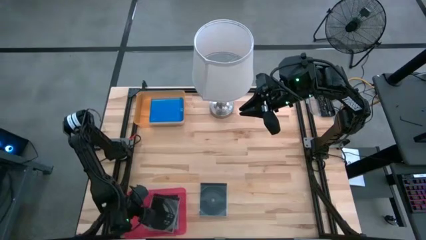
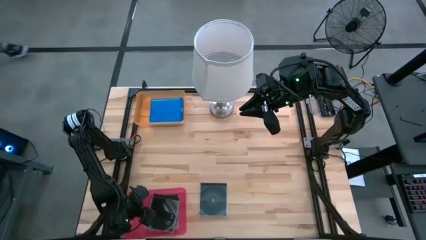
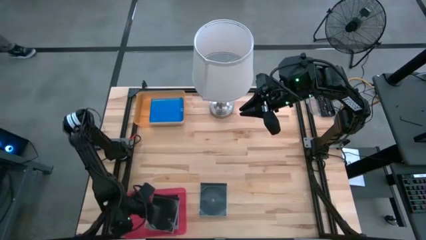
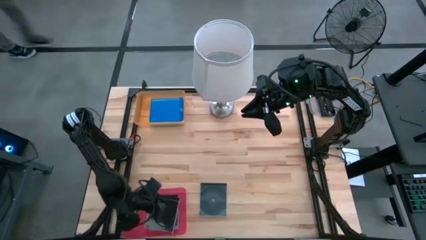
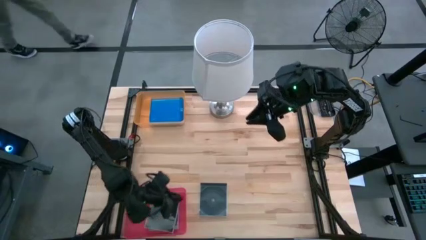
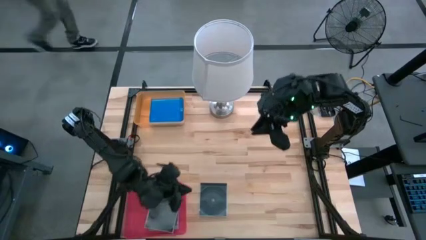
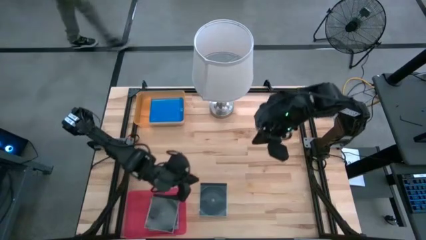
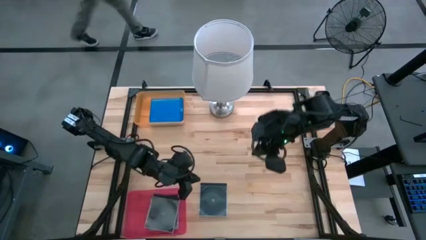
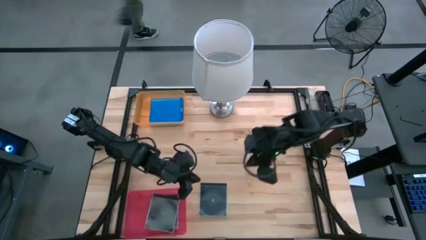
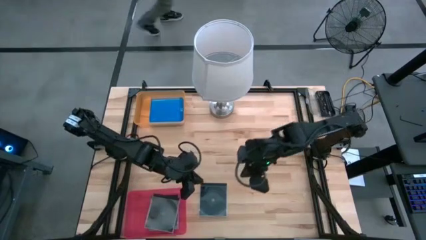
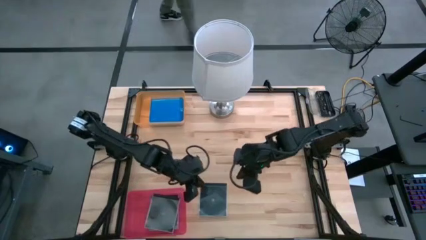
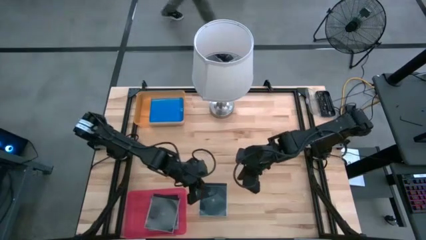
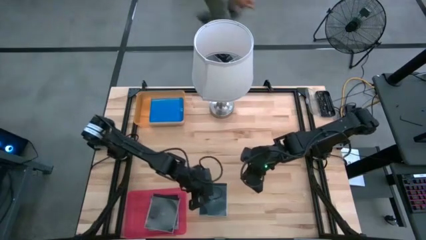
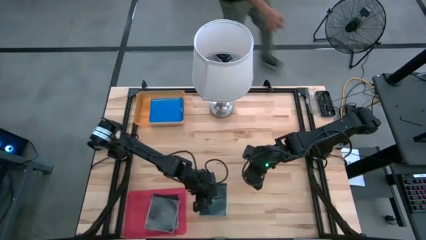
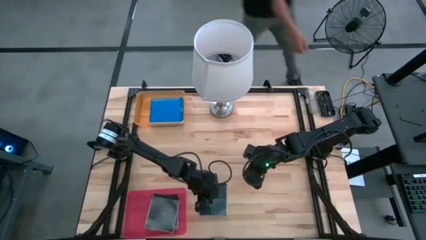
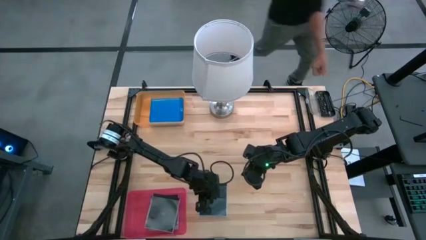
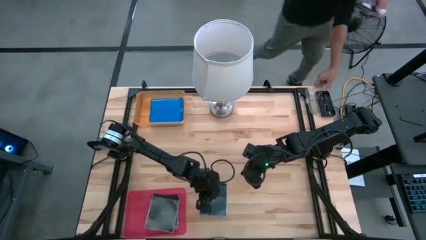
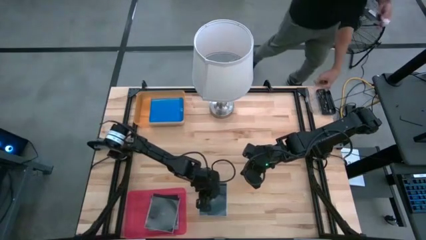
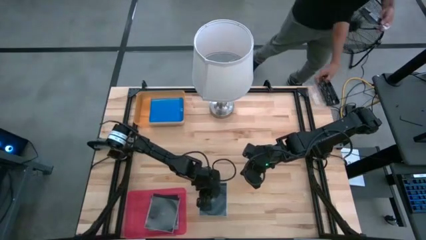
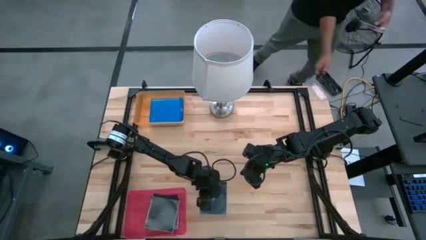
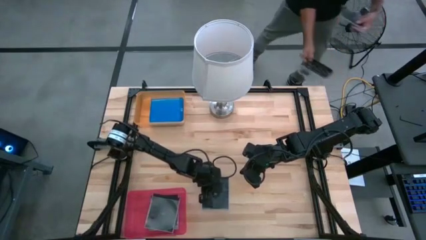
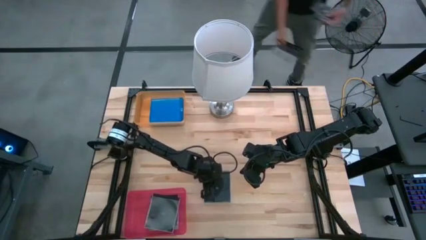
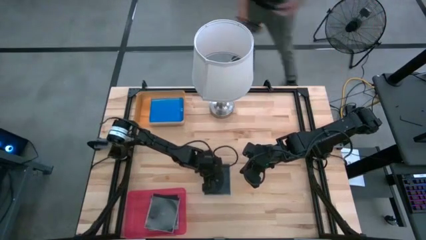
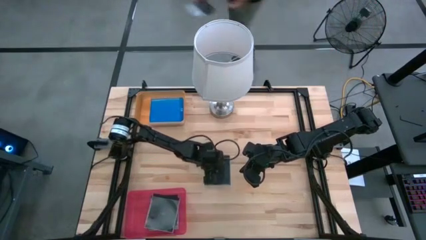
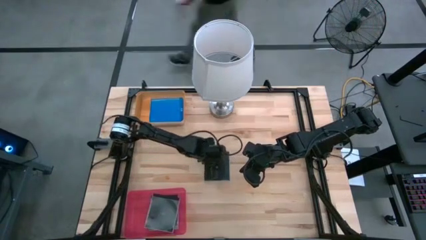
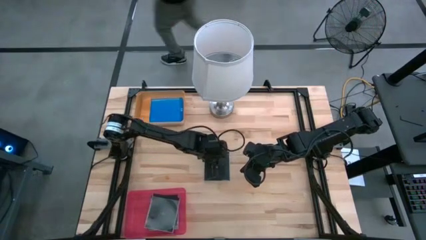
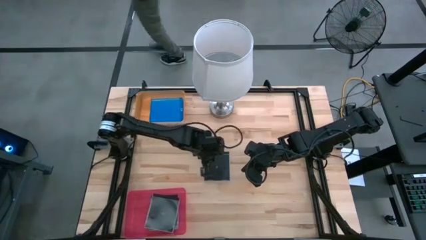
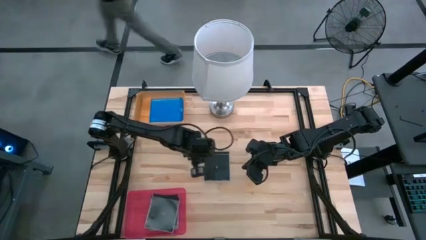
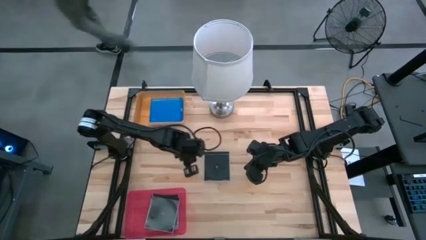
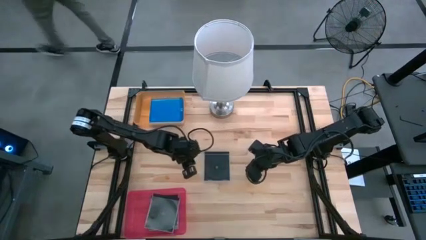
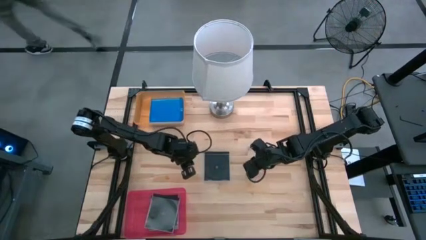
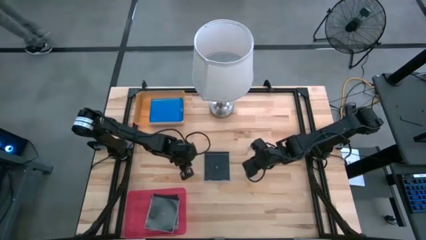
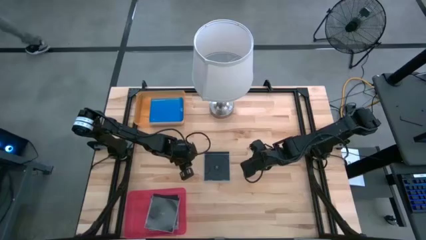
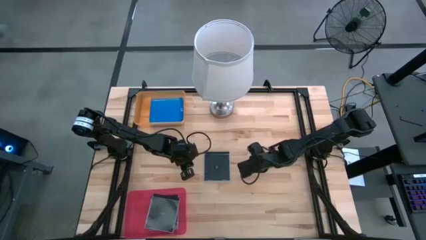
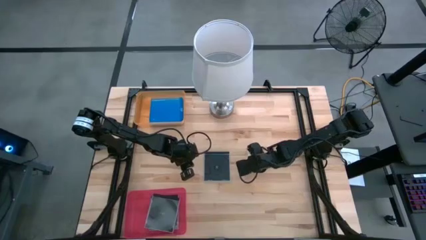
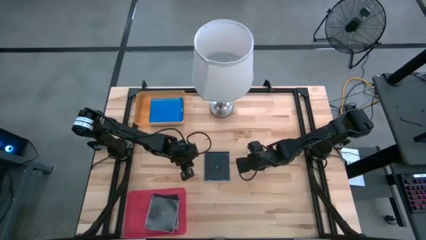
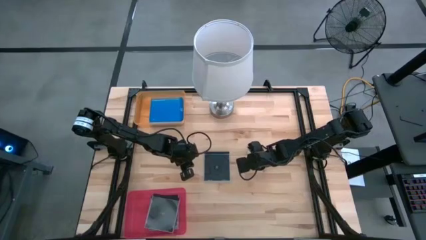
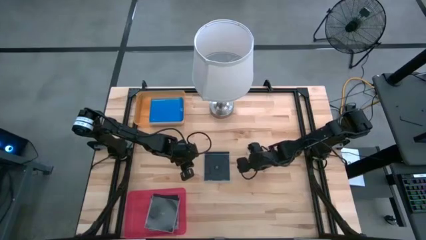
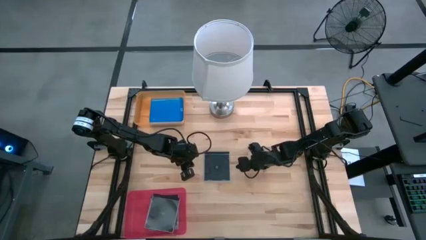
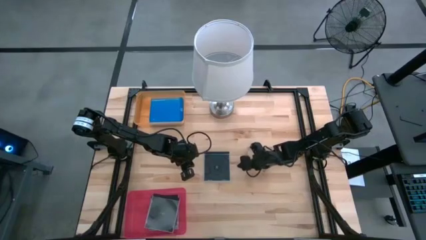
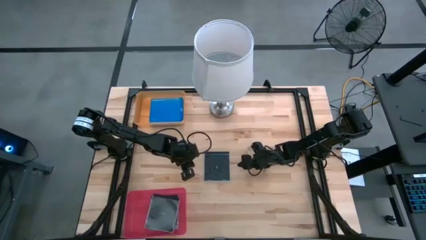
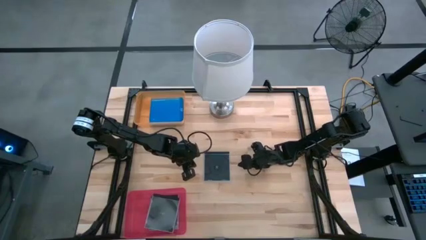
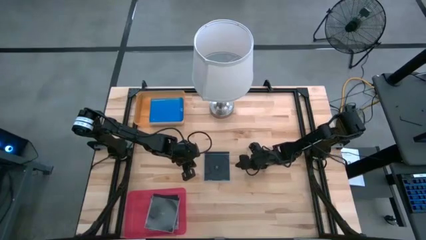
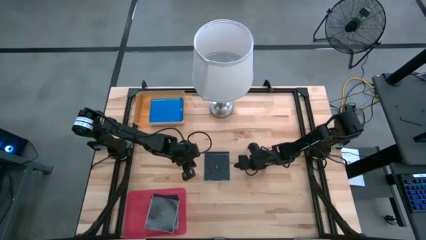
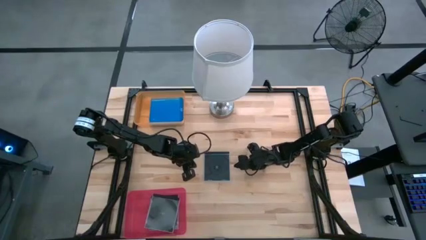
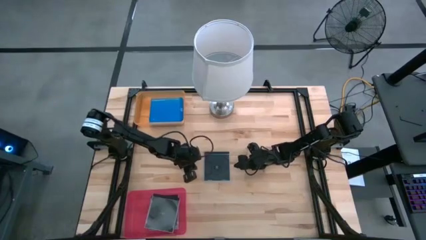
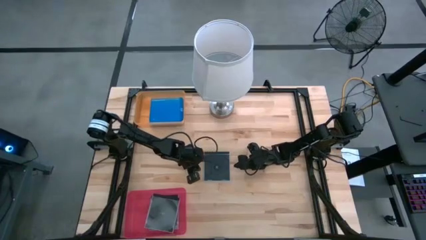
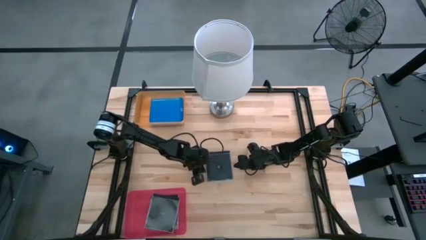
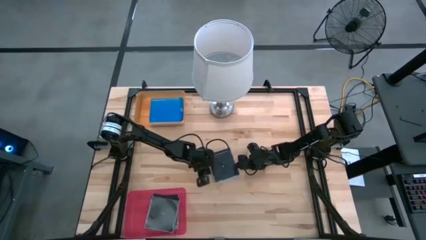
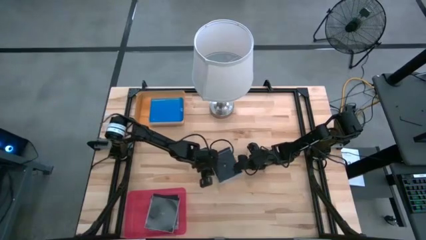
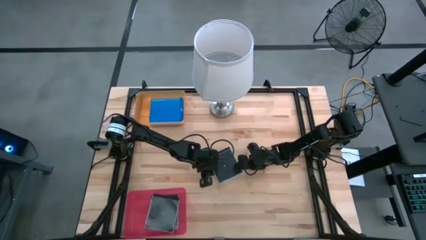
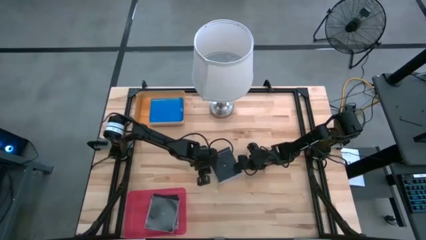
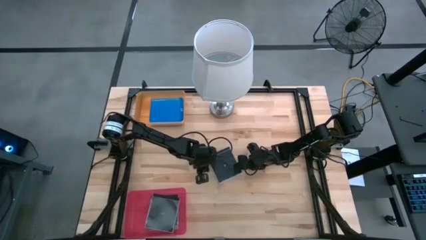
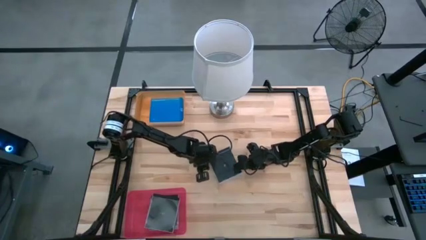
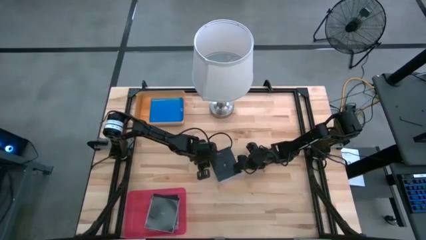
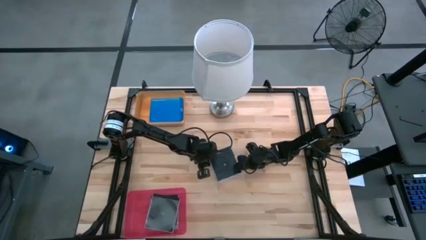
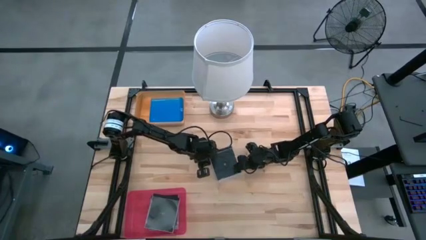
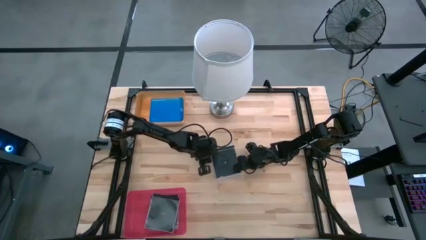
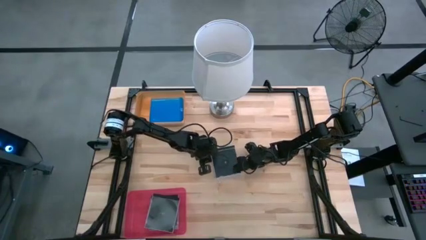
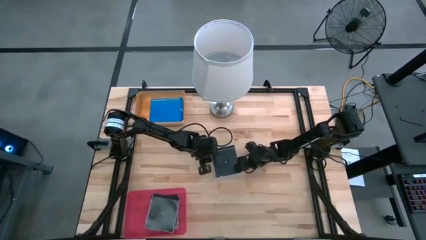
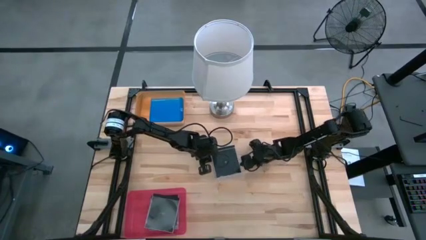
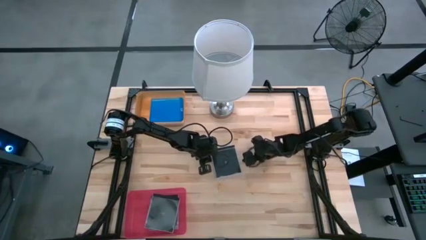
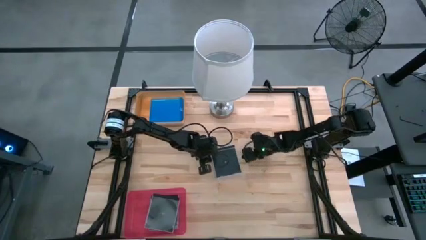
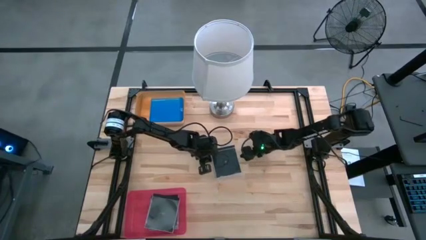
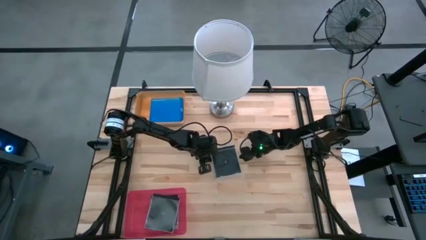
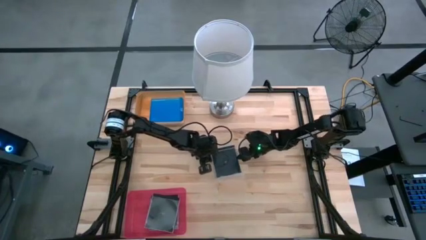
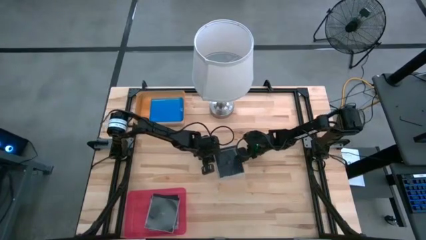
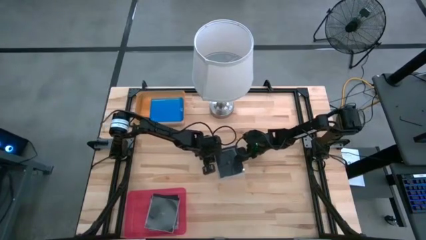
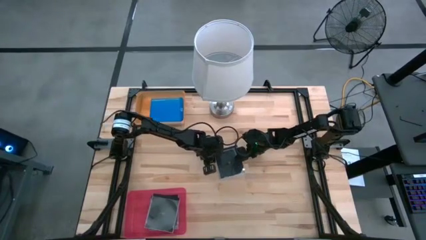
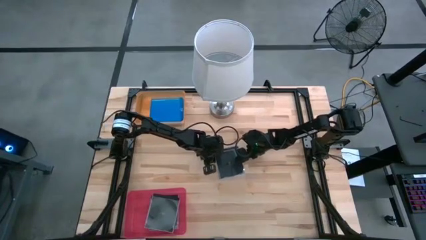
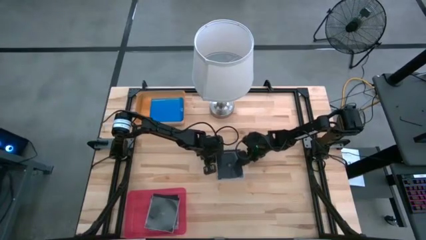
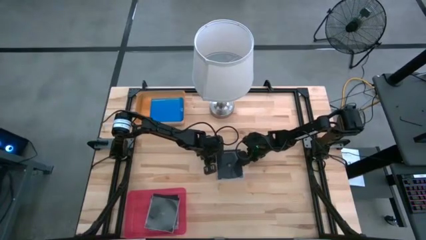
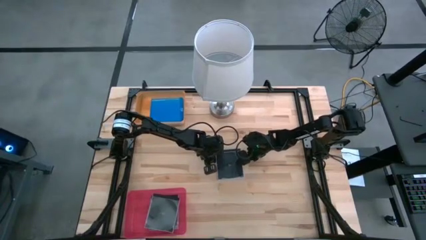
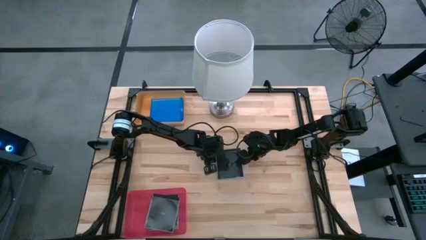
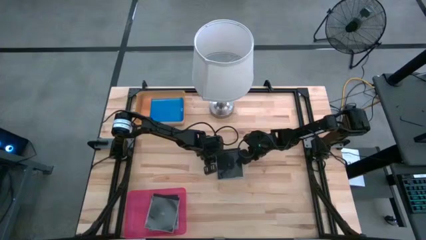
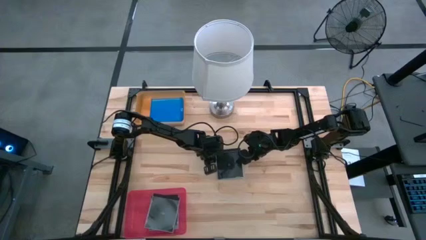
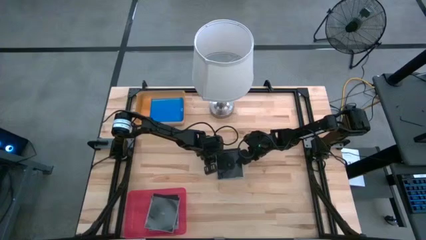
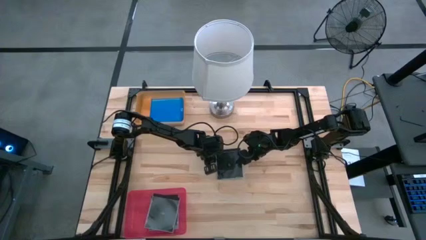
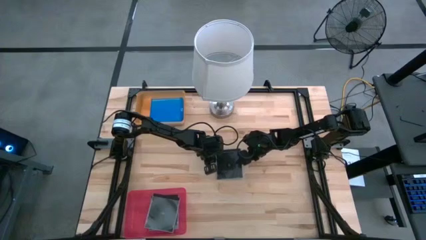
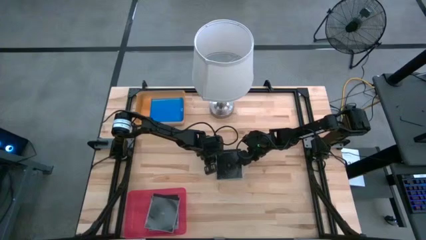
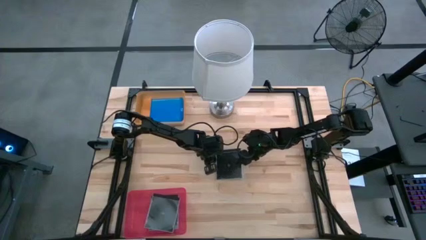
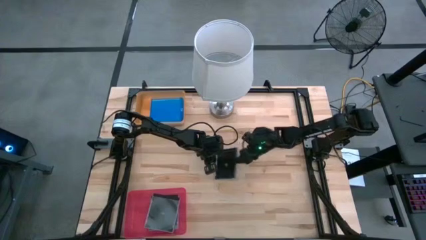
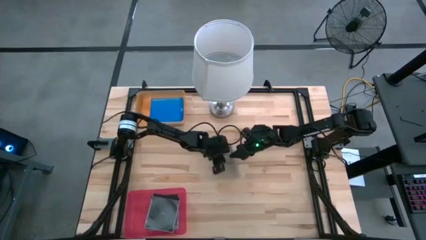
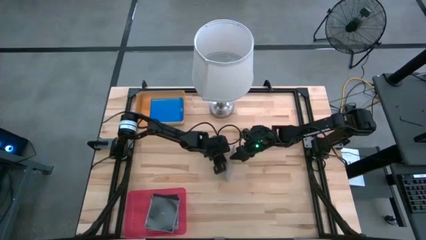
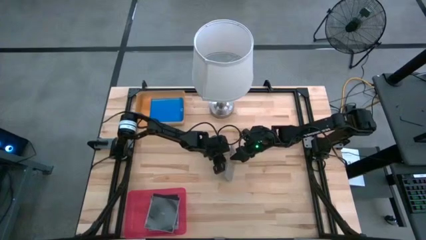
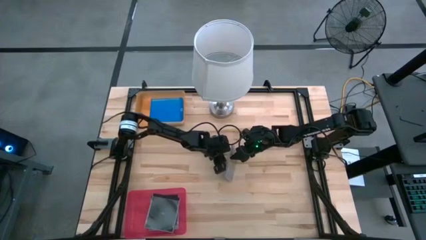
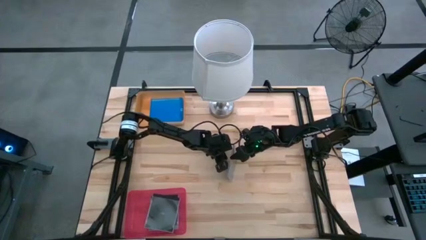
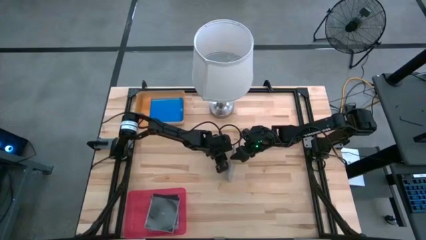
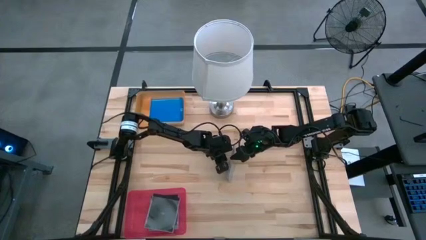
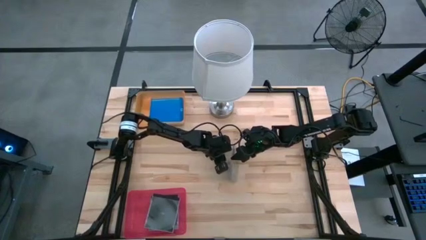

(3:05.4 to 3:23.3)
Task: Pick & place jewel cases by type
Put the black cd case into the pink bin
